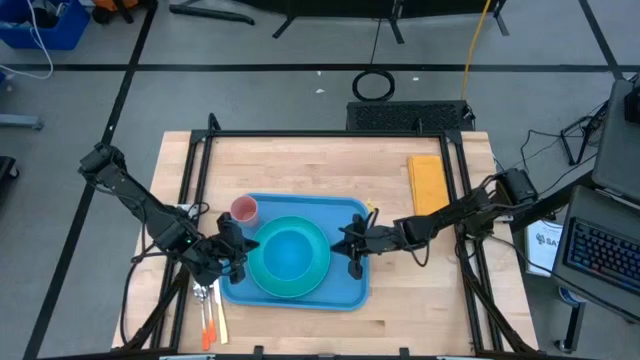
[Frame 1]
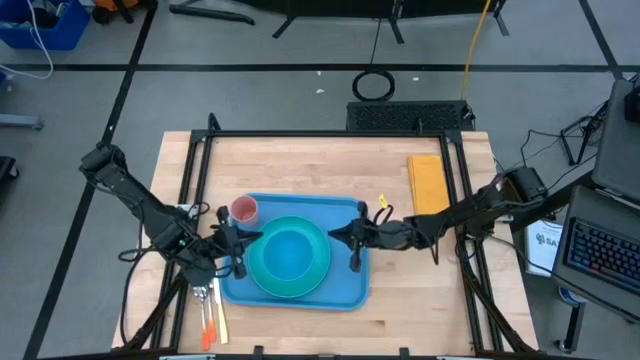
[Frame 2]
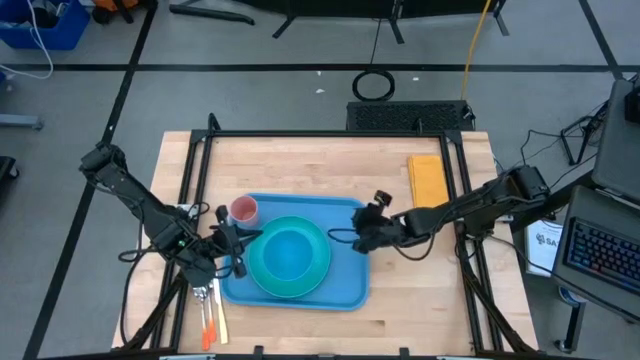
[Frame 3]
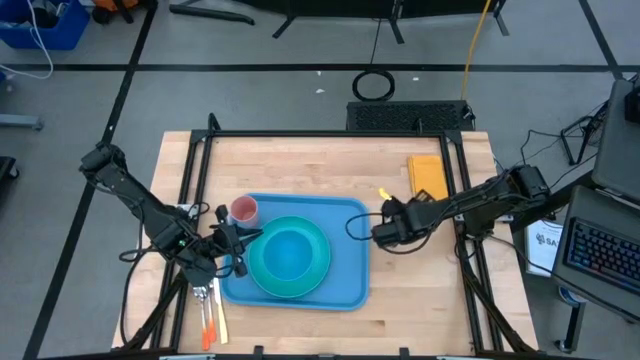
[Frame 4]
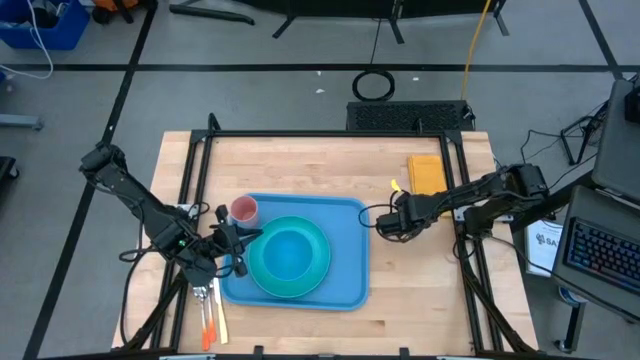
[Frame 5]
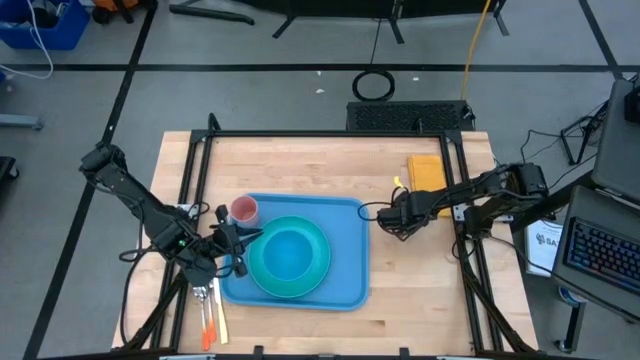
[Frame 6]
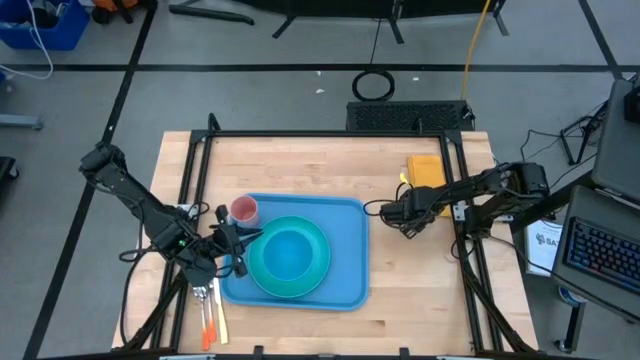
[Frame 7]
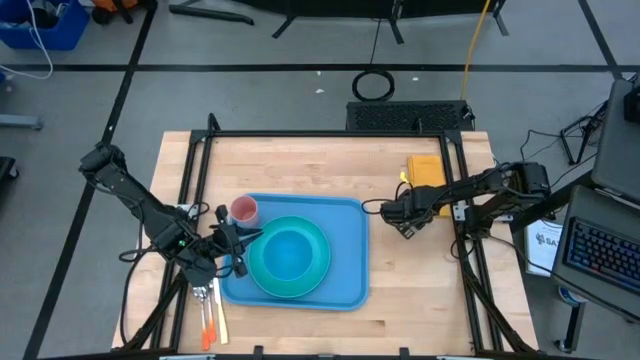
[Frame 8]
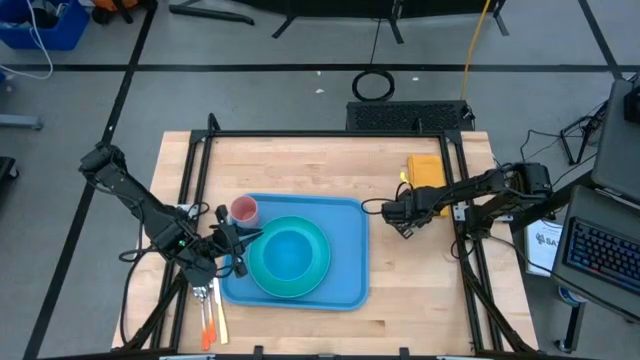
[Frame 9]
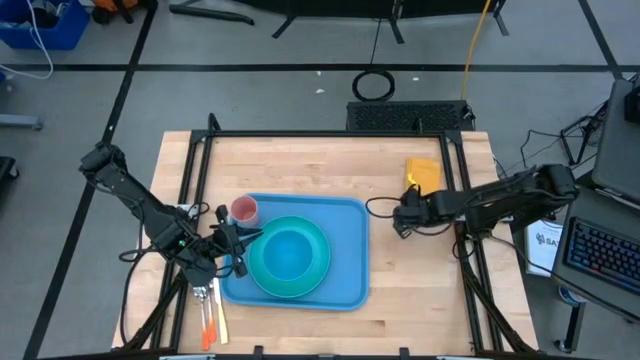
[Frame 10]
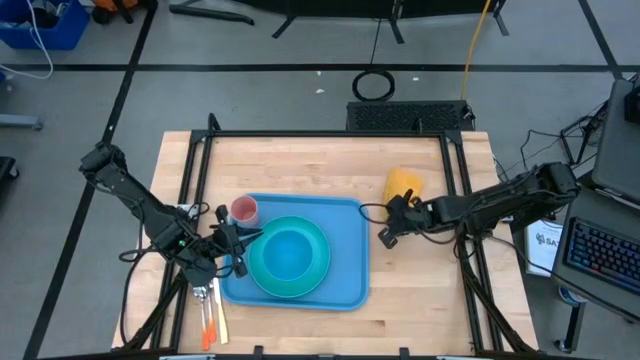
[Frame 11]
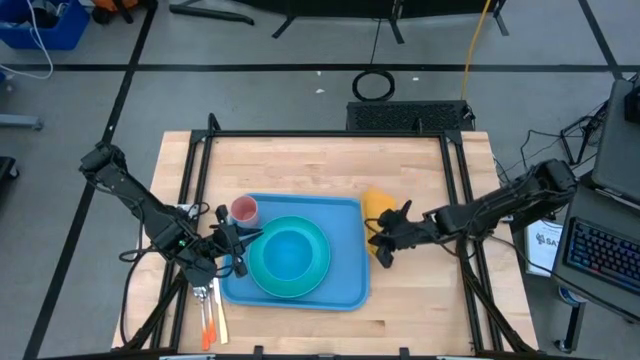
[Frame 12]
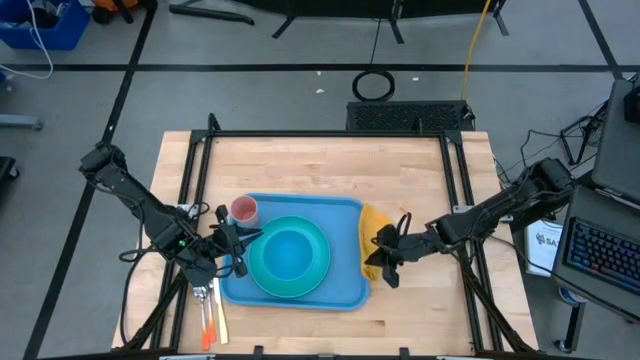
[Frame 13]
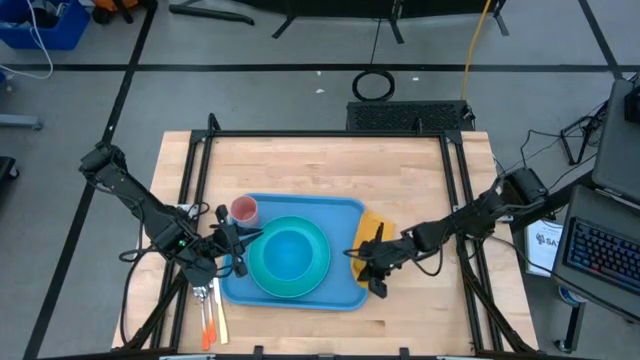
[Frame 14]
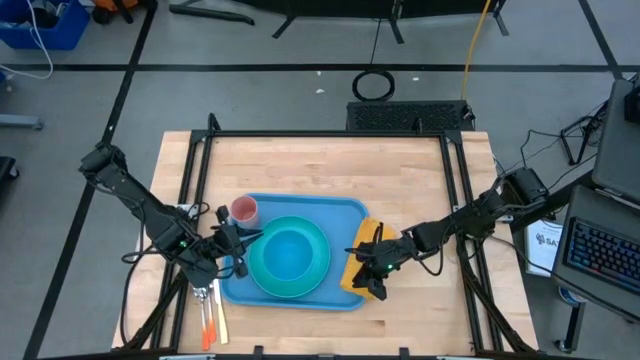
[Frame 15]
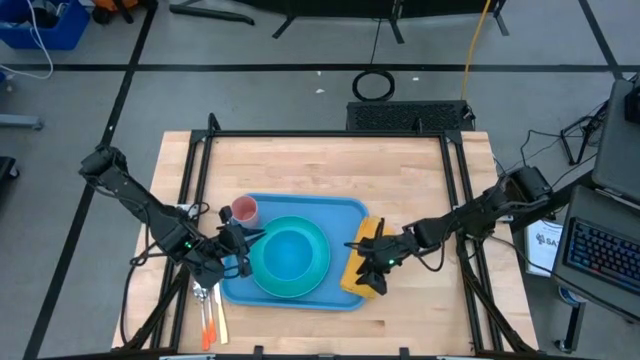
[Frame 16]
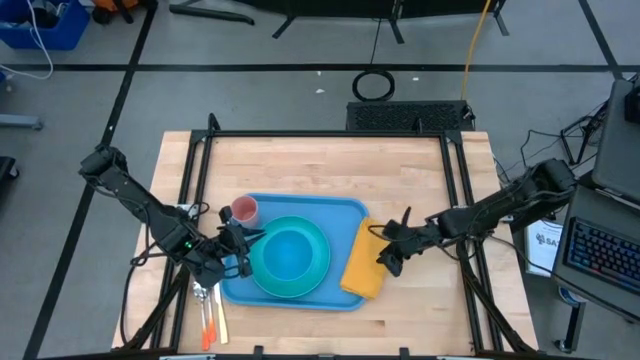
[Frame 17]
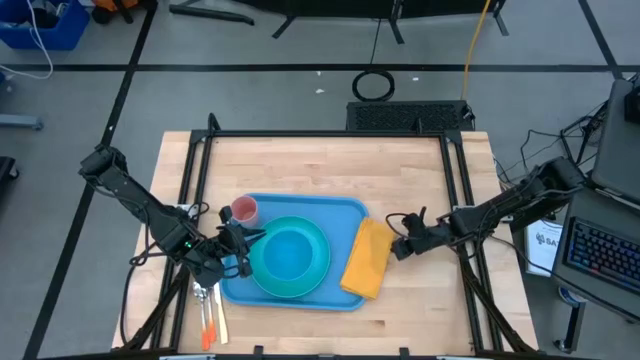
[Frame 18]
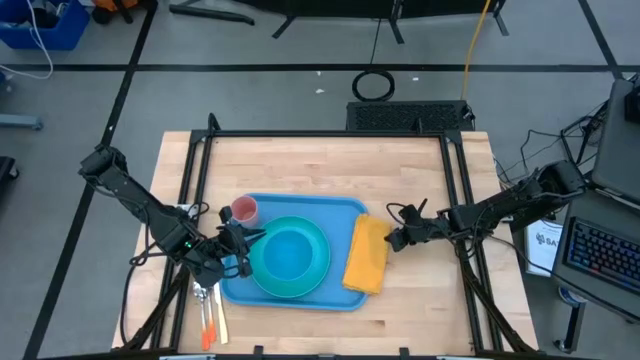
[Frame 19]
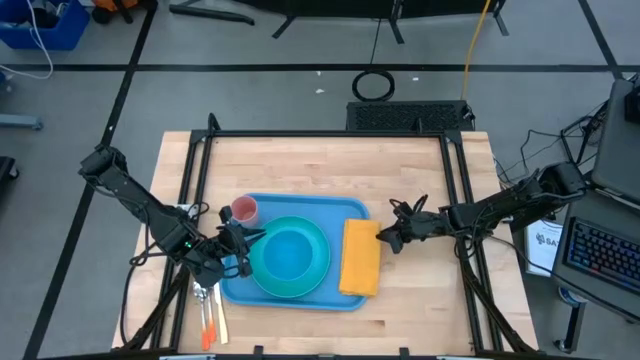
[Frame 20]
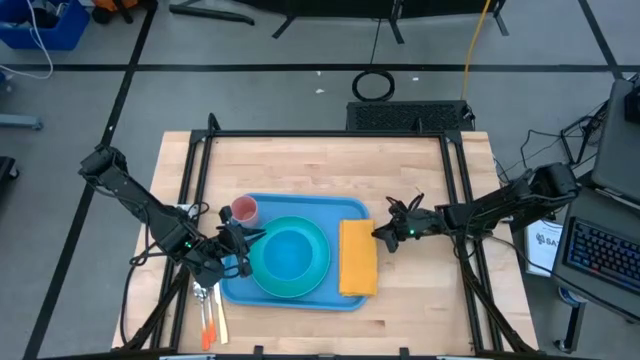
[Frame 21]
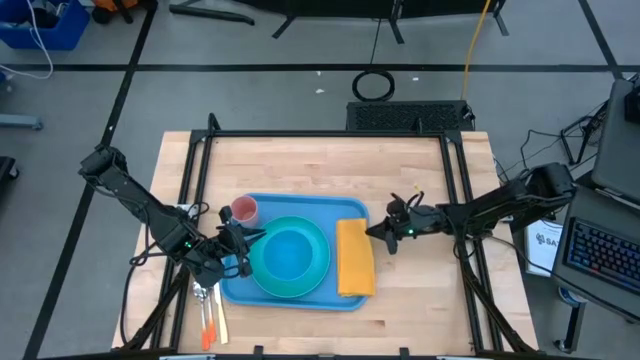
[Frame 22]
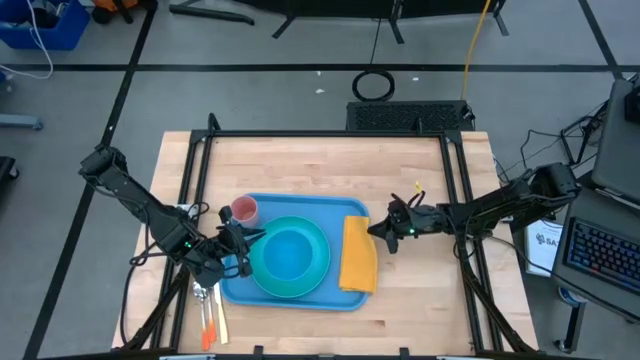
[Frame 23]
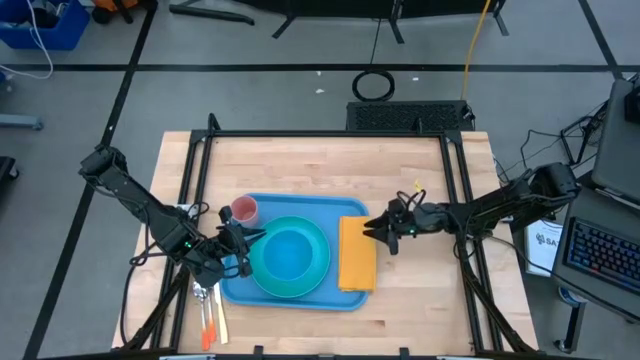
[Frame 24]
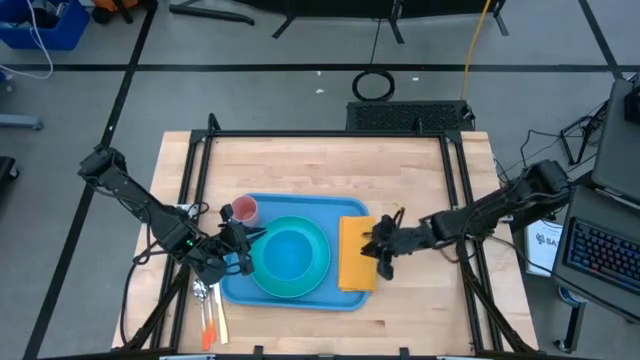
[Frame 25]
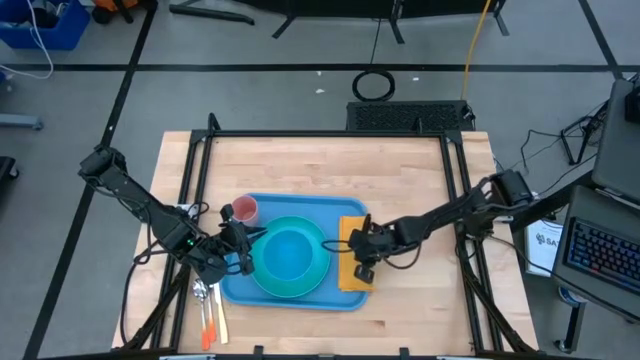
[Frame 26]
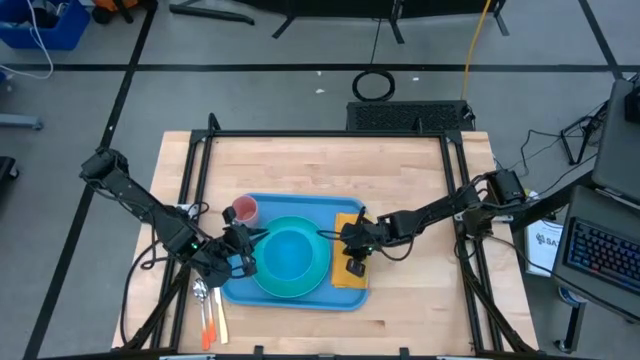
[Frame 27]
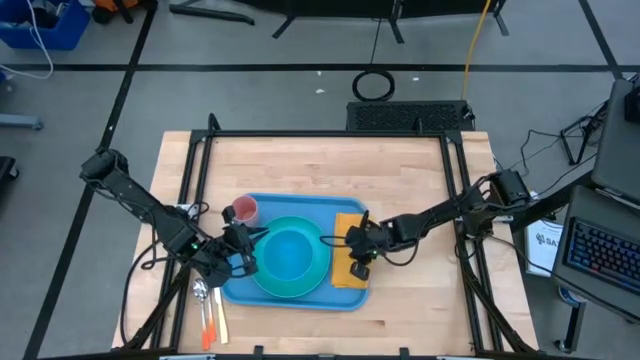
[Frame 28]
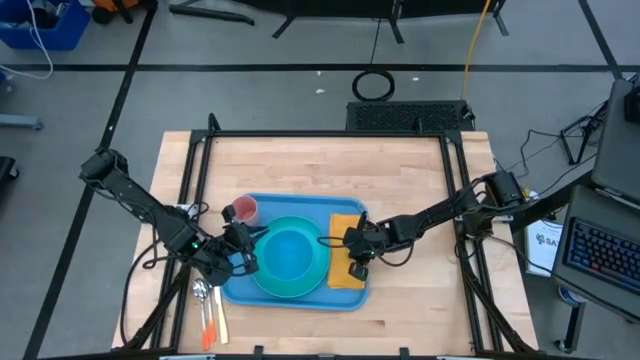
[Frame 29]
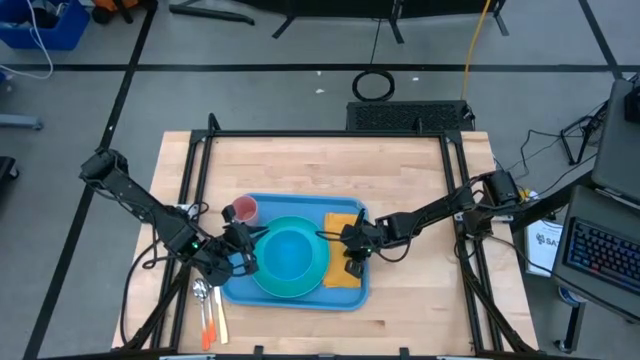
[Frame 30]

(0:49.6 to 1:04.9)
Task: Set up tray
Put the yellow napkin on the blue serving tray to the right of the light blue plate

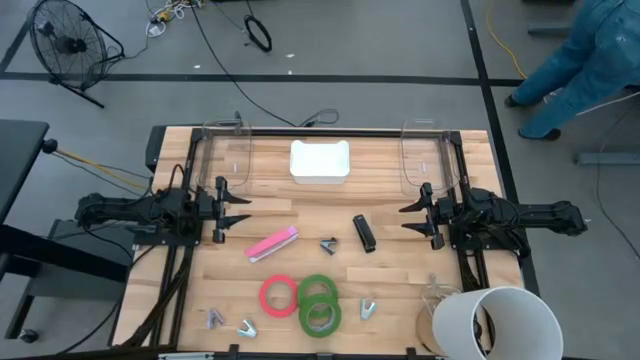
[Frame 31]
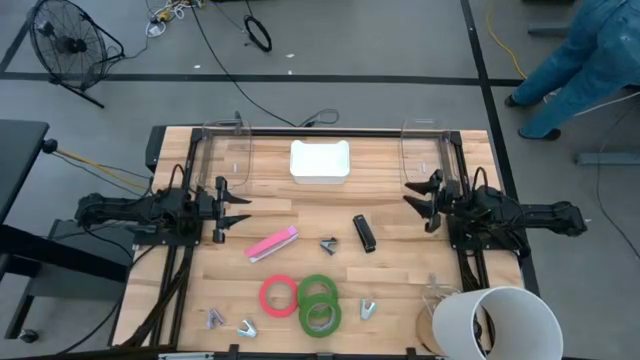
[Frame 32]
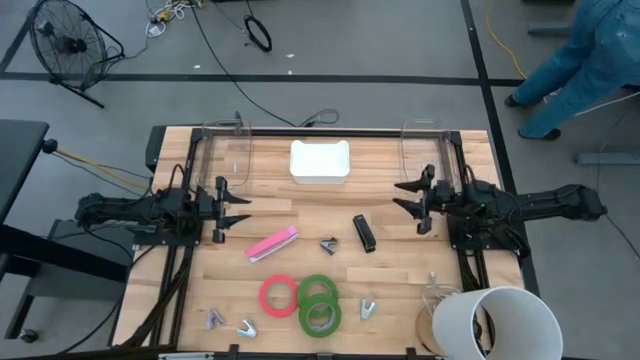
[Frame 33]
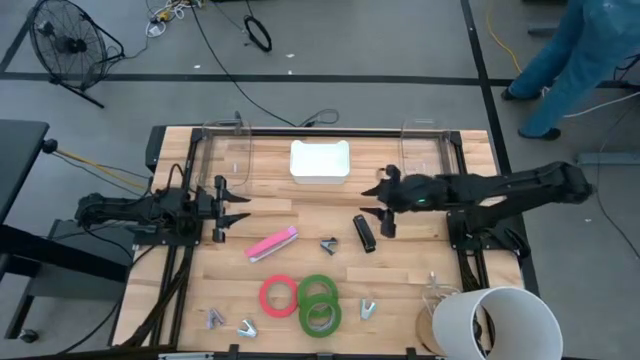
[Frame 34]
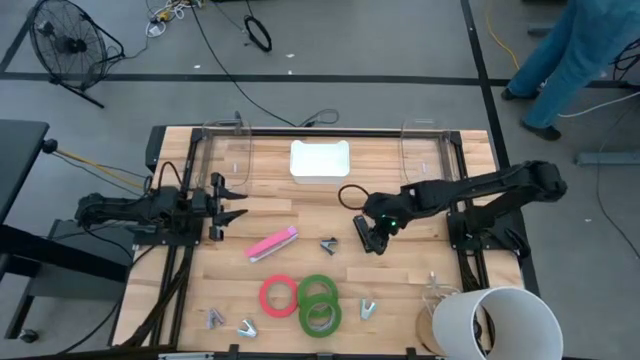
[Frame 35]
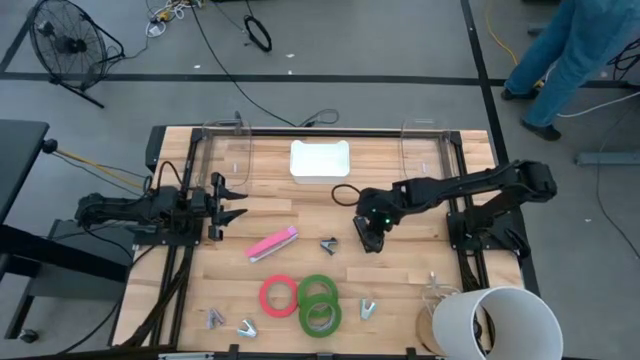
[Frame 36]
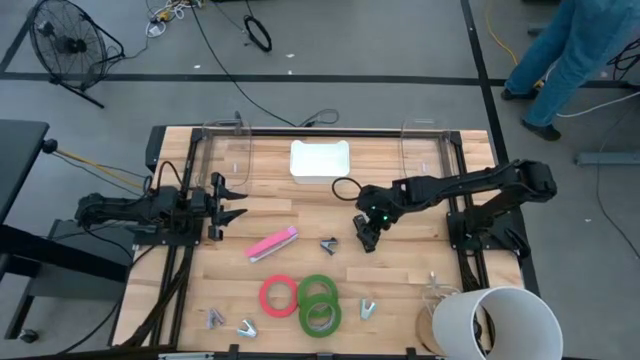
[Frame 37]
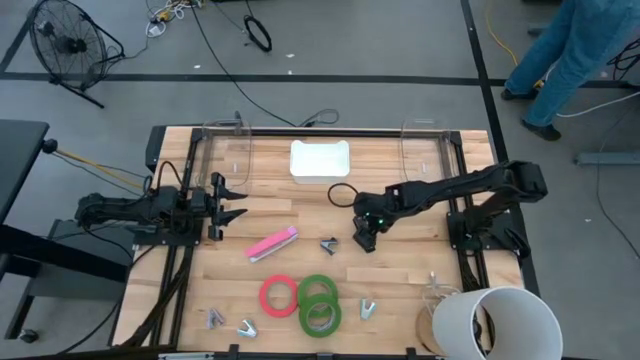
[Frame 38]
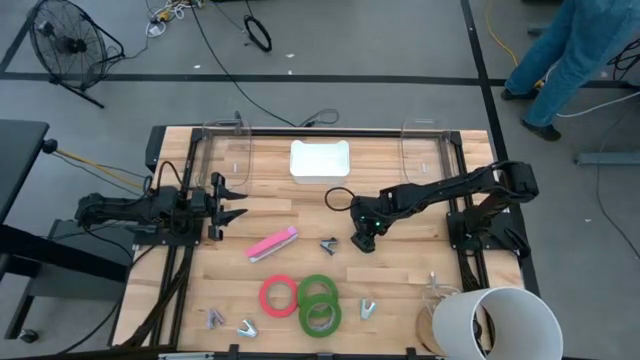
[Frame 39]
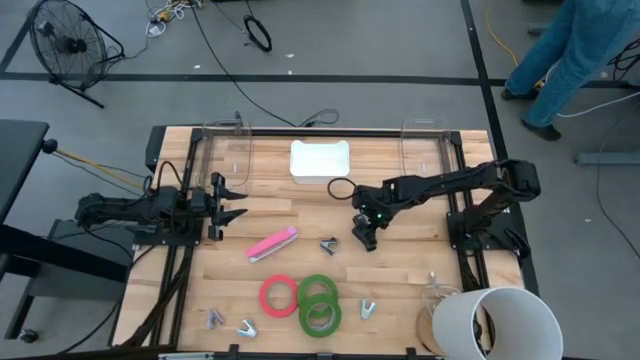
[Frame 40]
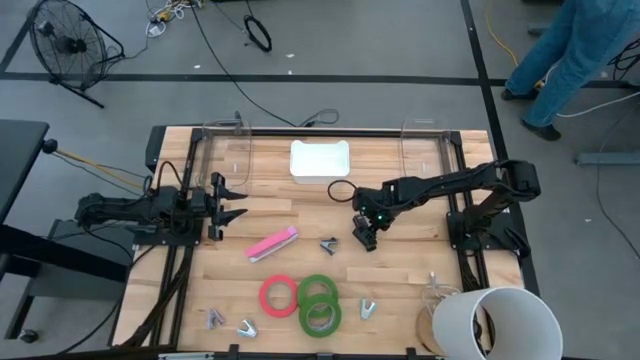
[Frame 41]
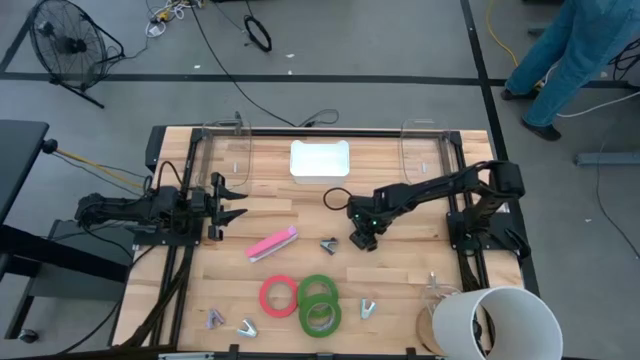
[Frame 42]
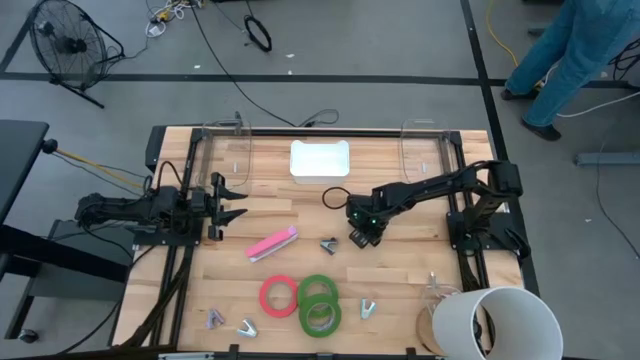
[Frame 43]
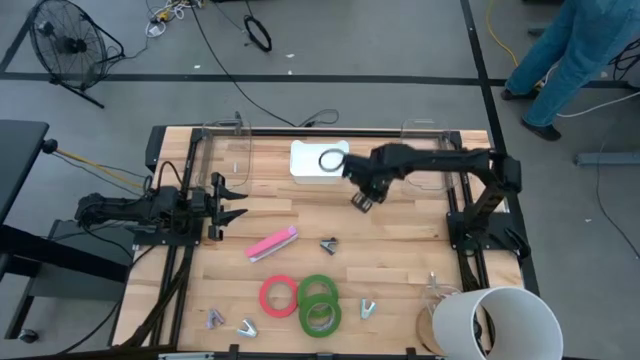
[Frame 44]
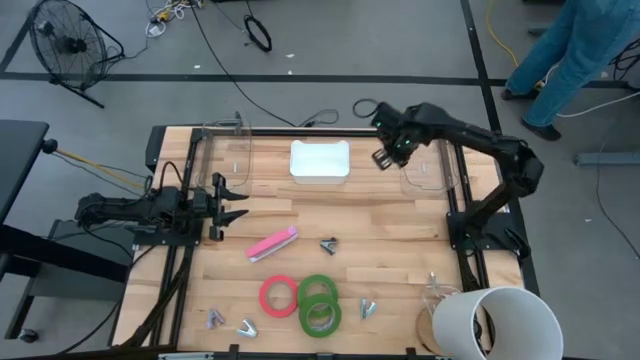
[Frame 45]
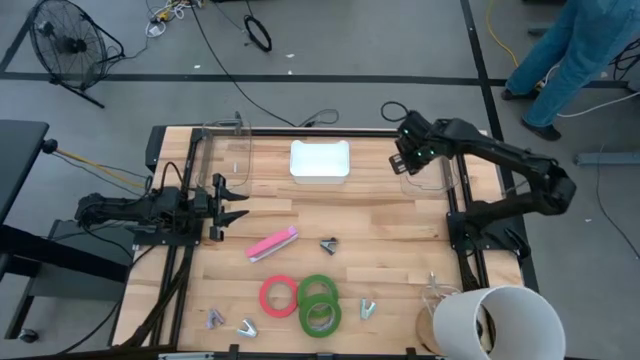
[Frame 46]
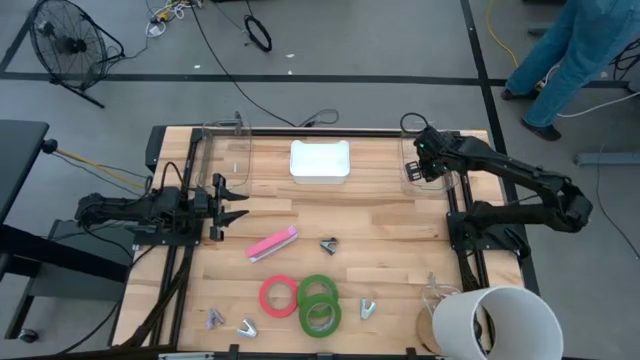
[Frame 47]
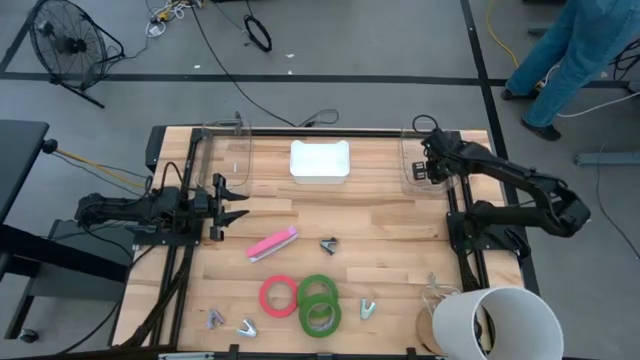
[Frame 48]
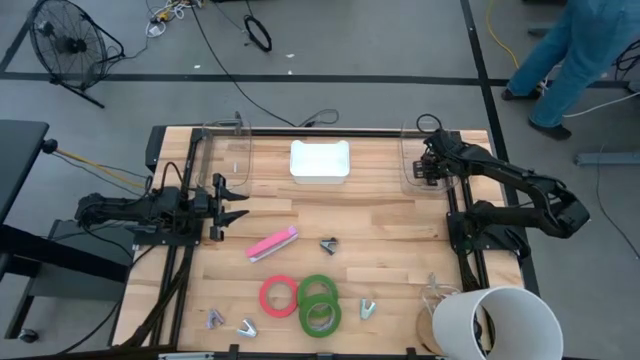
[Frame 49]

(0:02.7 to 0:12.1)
Task: Pick and place Stapler, Stapler remover, tape
Put the black stapler into the right transparent bin
